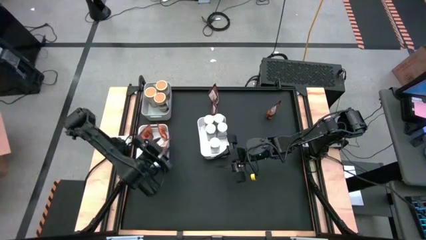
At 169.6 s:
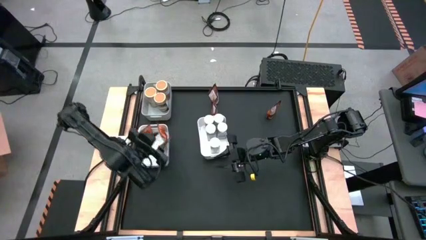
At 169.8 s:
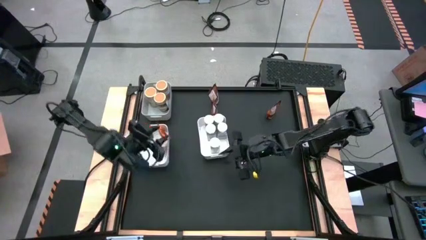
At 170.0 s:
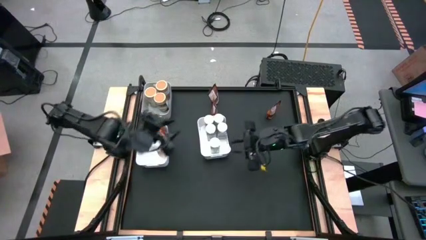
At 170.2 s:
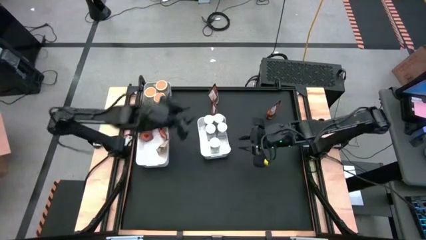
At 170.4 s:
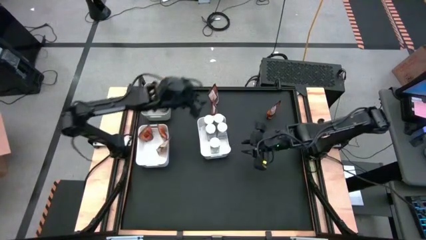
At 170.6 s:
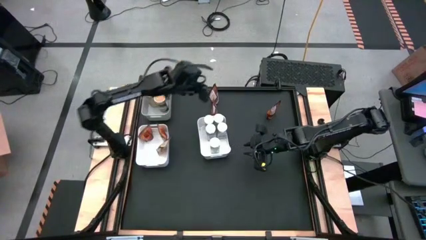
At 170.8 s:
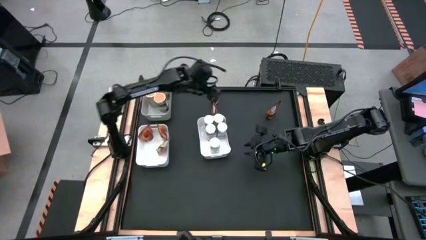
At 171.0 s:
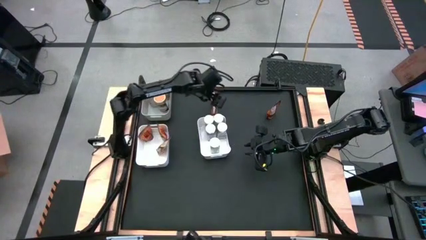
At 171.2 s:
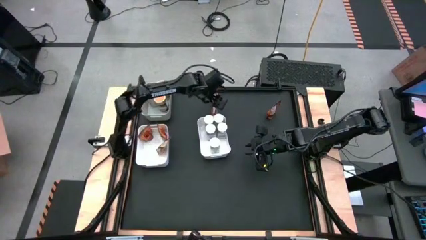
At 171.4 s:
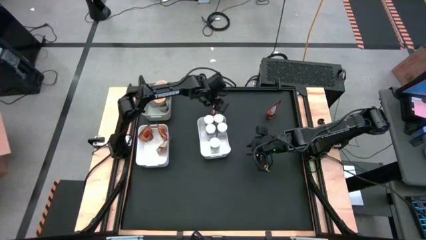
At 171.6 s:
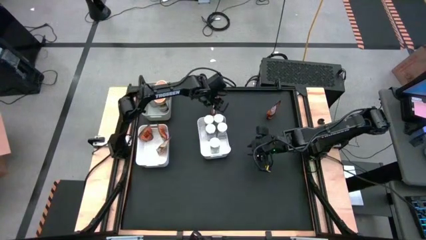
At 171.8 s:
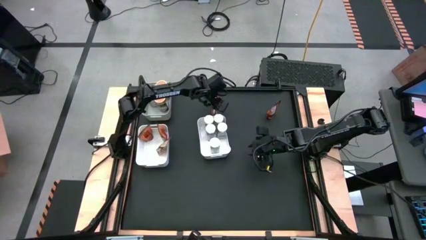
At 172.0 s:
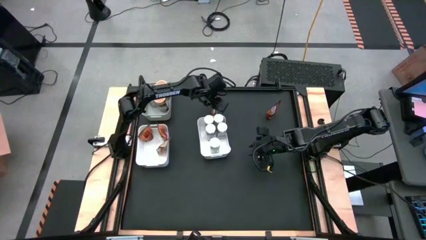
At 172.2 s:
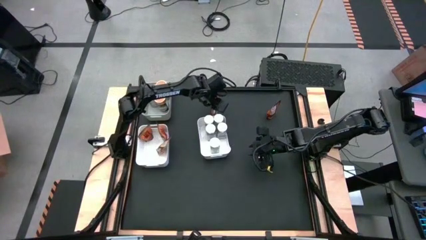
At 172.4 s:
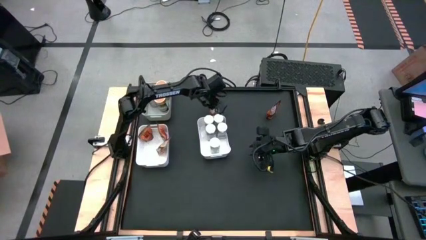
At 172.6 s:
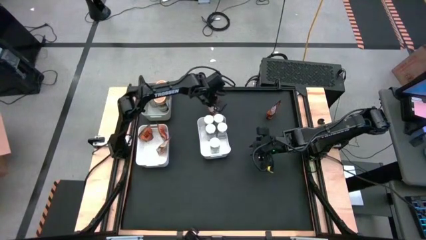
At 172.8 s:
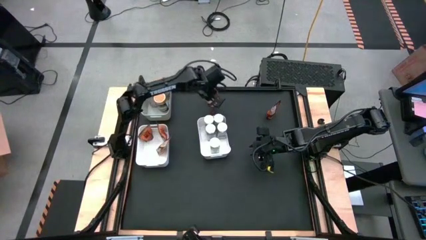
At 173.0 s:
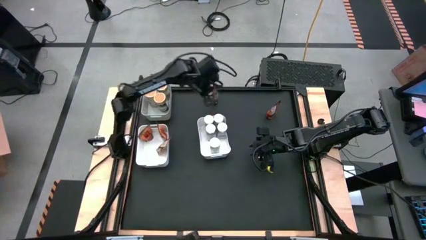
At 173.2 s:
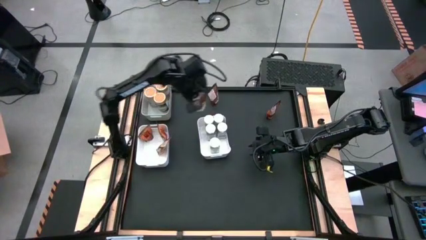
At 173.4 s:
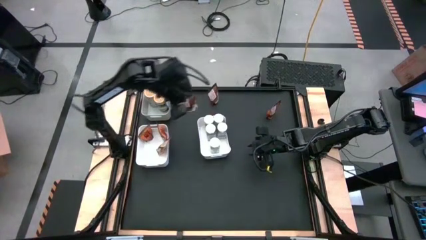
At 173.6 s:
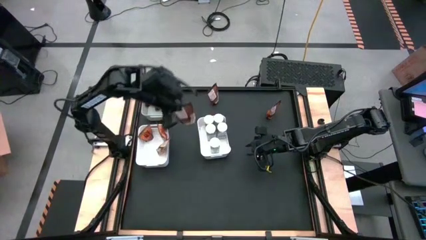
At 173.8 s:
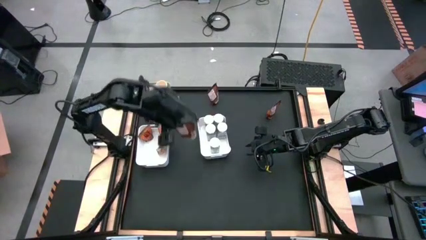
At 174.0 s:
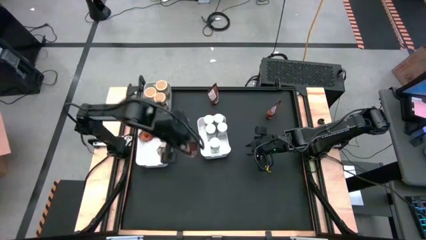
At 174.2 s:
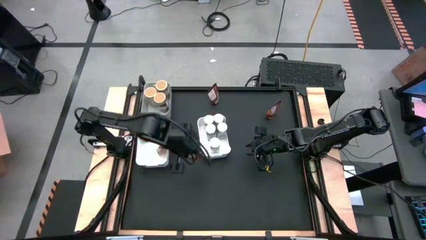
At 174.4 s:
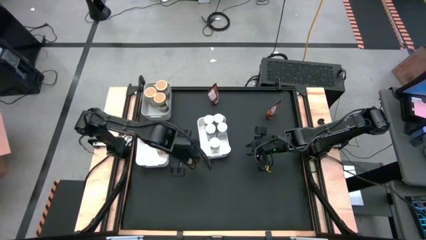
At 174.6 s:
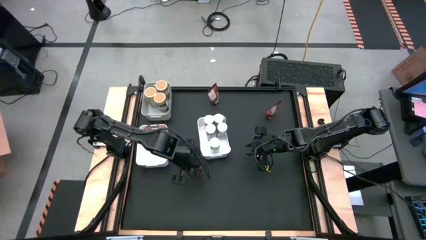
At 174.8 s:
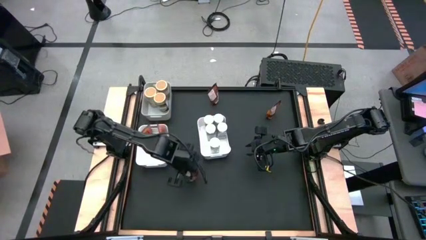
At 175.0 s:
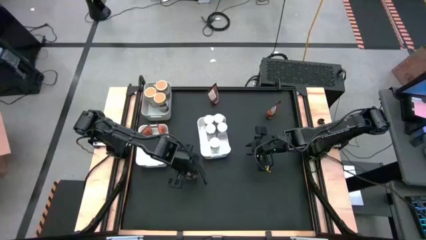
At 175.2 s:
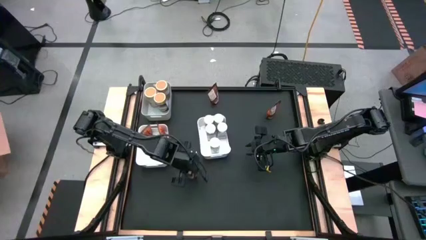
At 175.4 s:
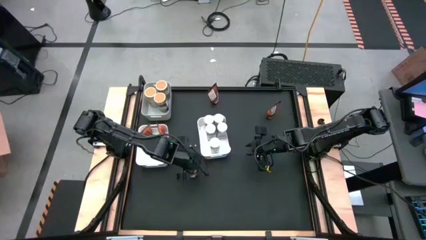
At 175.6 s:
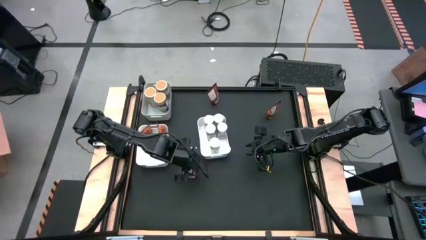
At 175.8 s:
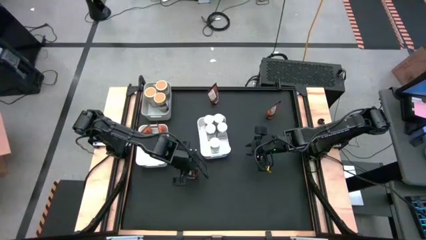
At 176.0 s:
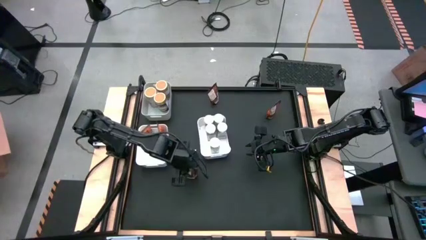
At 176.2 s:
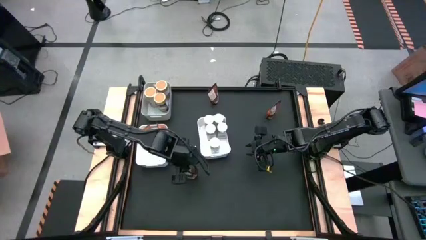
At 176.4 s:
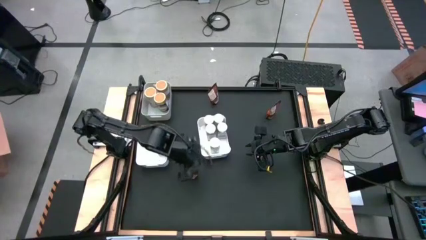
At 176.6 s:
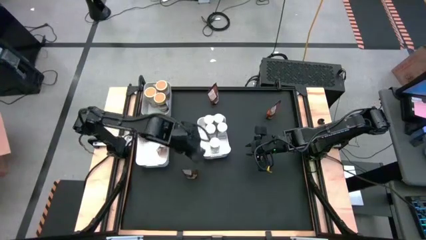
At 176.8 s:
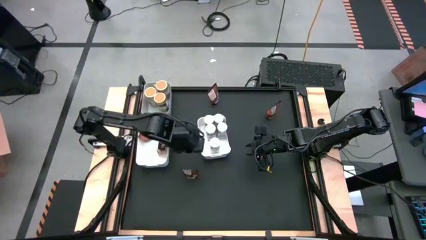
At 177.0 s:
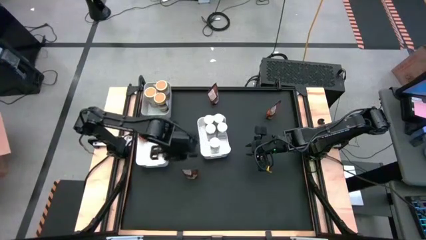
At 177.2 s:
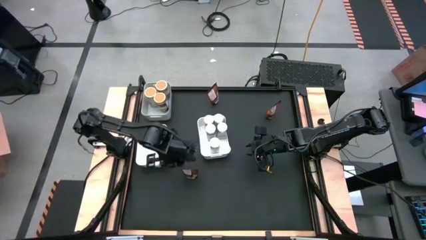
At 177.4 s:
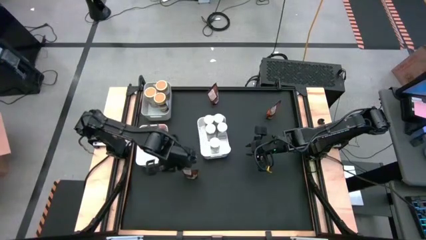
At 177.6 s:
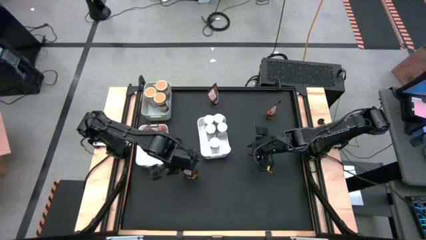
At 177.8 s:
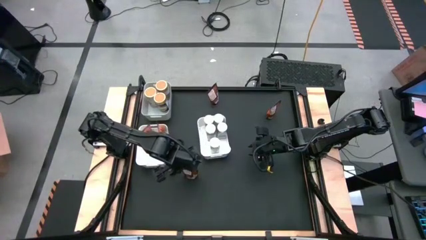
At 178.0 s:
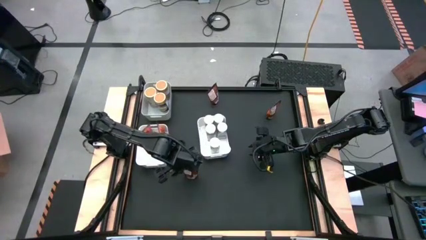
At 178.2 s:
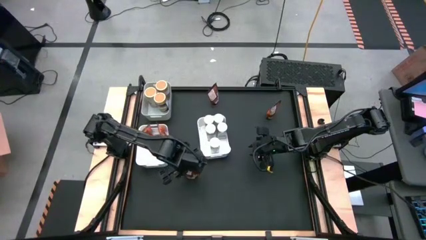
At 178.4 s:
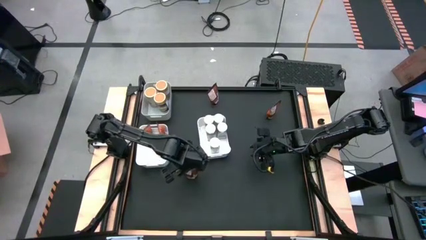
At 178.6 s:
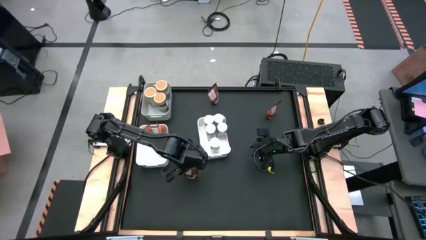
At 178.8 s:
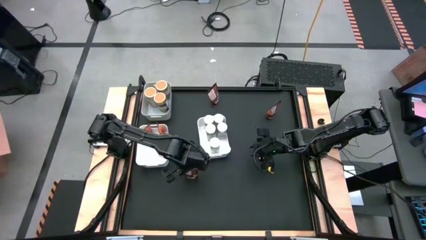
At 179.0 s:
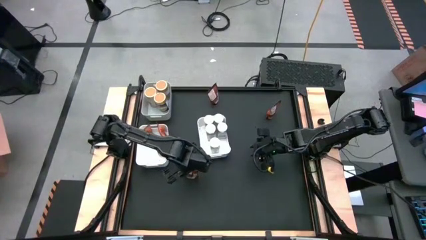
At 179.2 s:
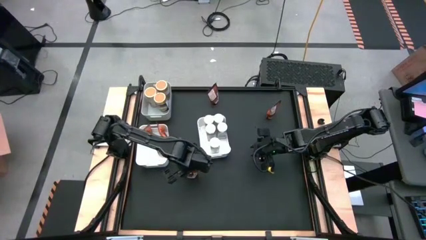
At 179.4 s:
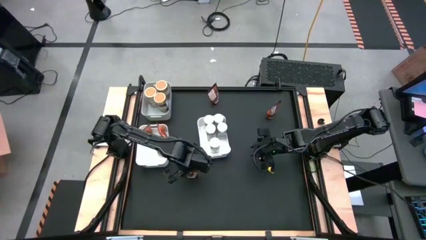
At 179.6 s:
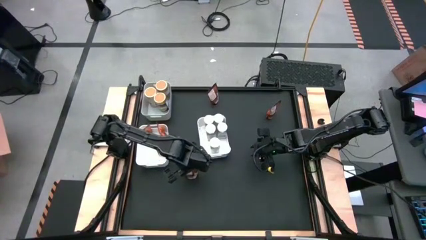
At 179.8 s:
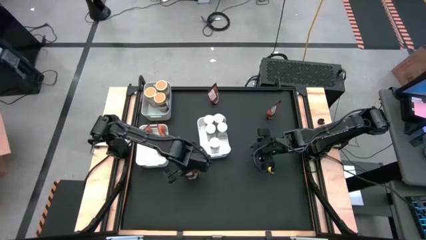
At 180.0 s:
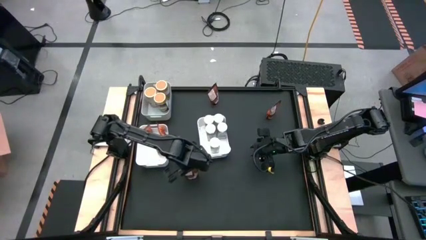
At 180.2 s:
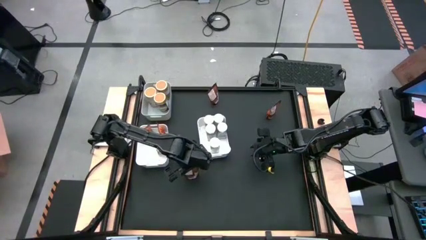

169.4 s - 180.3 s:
Task: Sort spices by type
Put the orange seasoning pack into the left white bin
